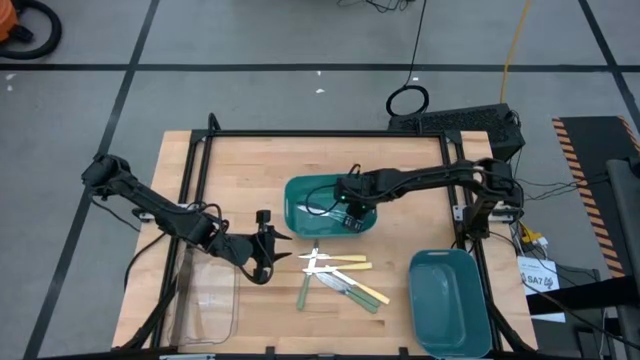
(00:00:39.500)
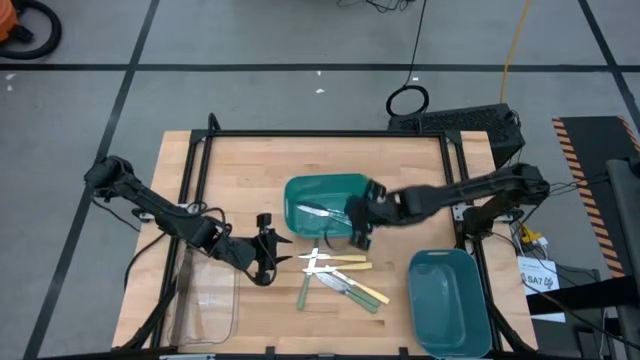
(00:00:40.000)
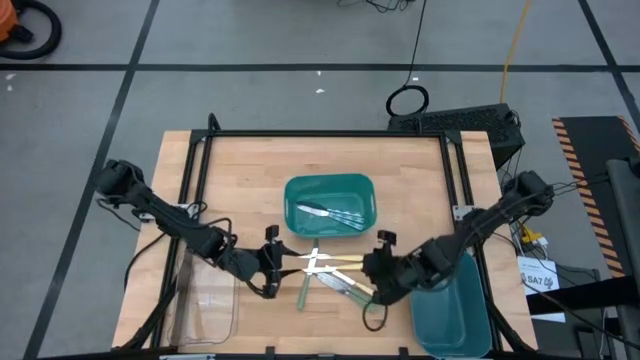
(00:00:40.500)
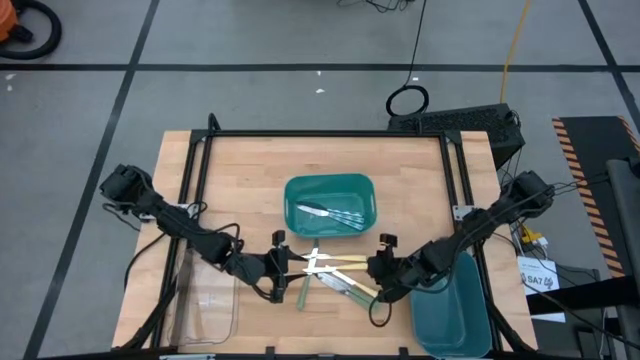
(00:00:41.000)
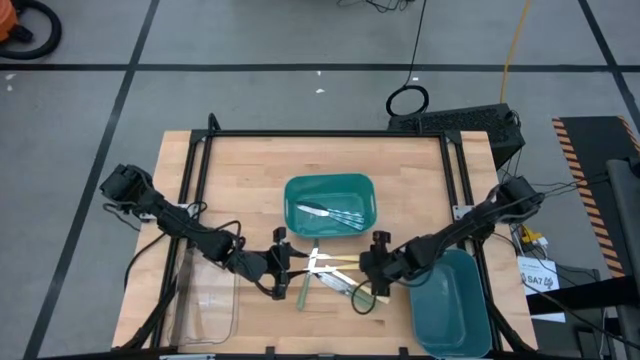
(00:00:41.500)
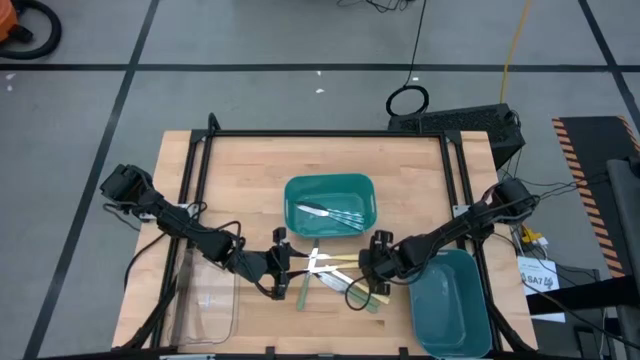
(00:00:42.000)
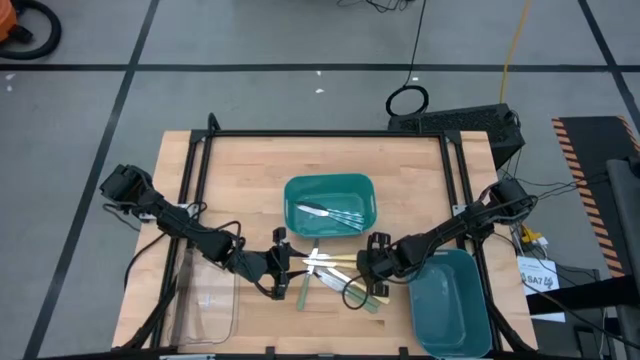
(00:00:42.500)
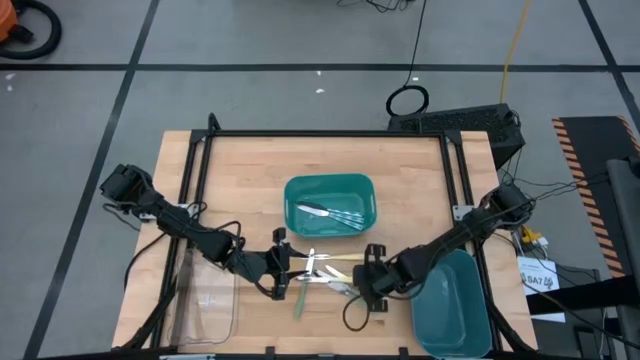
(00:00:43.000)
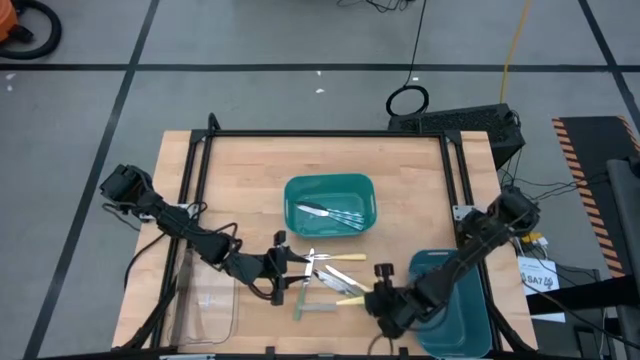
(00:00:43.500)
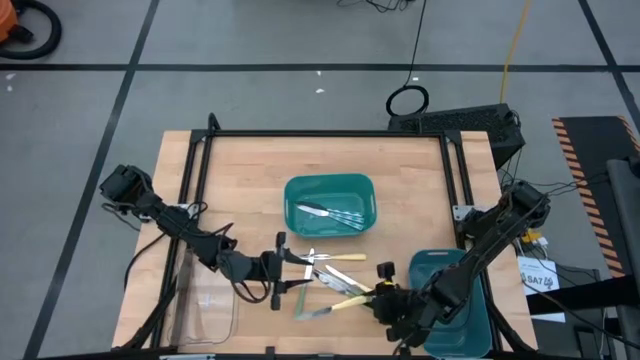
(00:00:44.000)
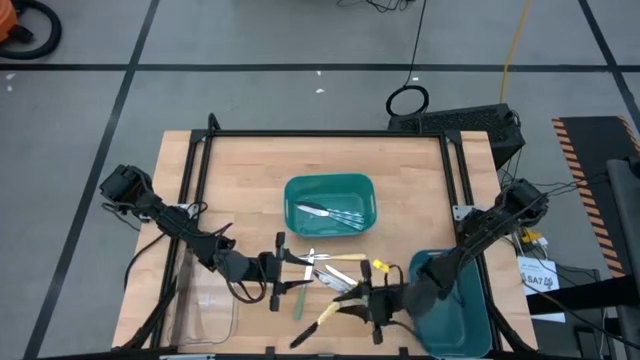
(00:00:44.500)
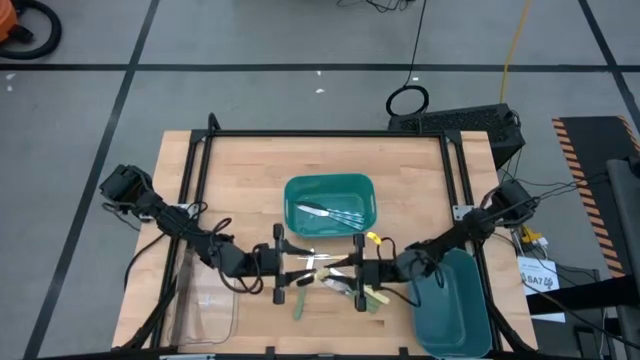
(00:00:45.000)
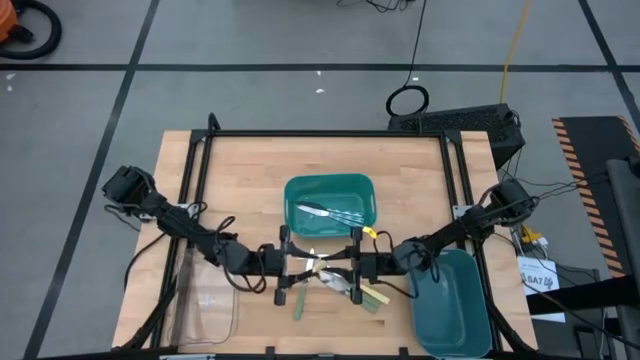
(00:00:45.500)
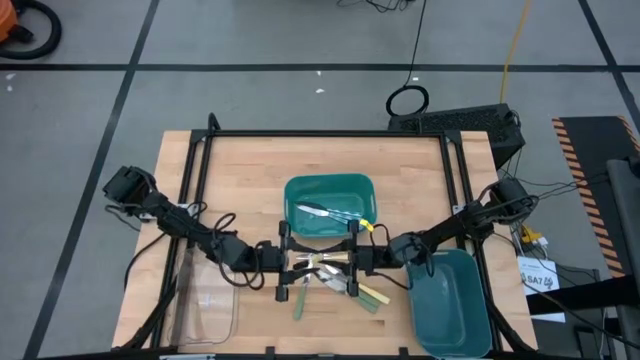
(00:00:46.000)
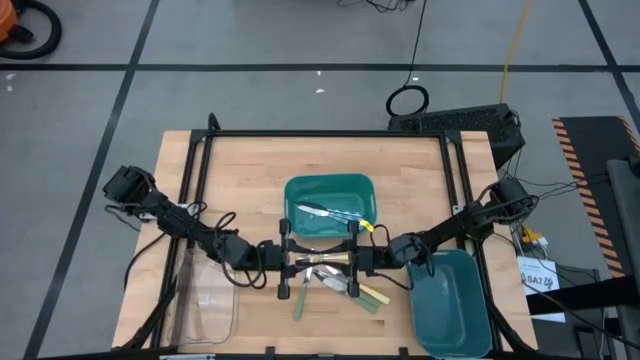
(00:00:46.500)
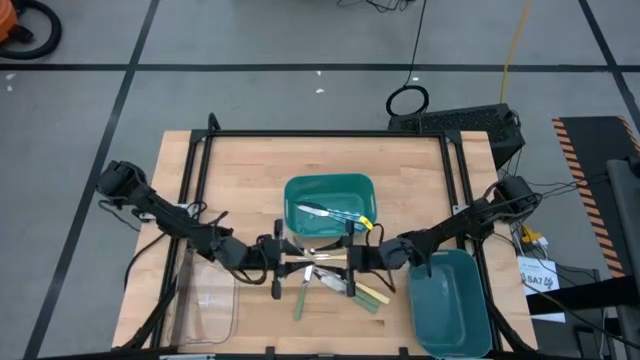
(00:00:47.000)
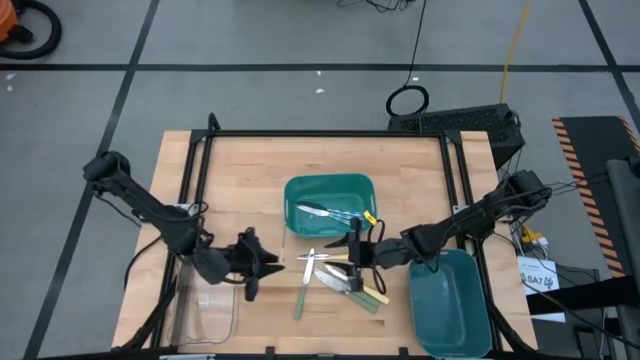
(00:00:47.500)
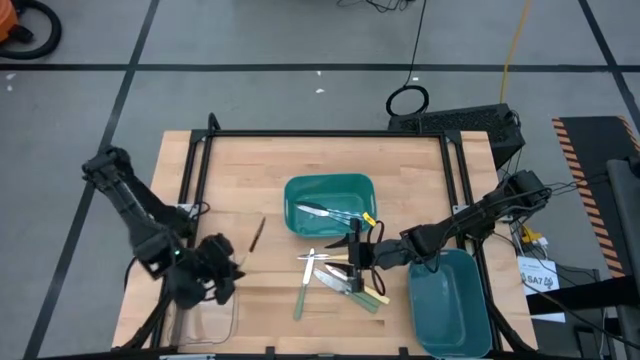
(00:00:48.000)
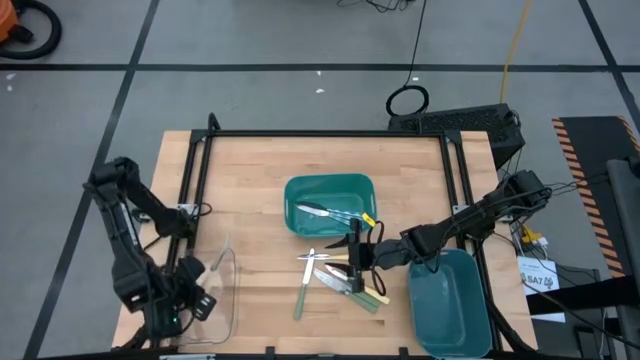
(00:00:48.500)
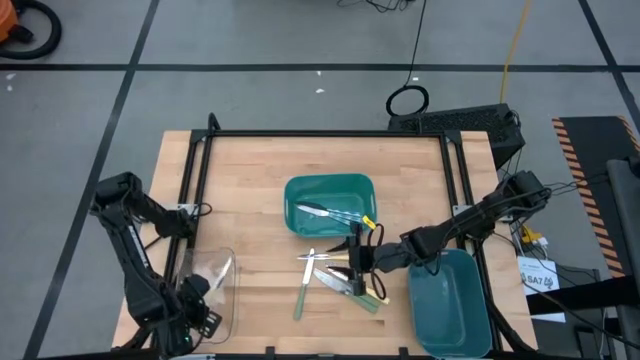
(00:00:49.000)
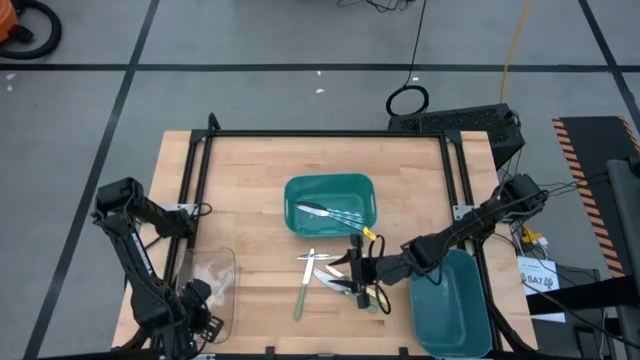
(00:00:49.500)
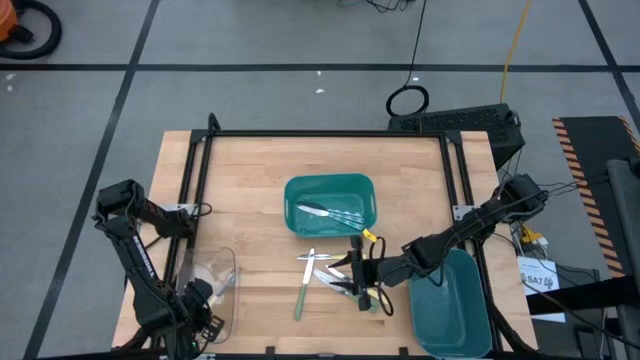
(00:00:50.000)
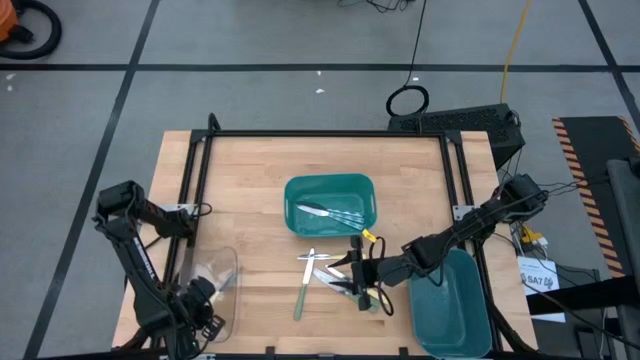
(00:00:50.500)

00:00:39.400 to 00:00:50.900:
Task: Sort silverware by color (type)
Put the middle yellow knife into the transparent bin

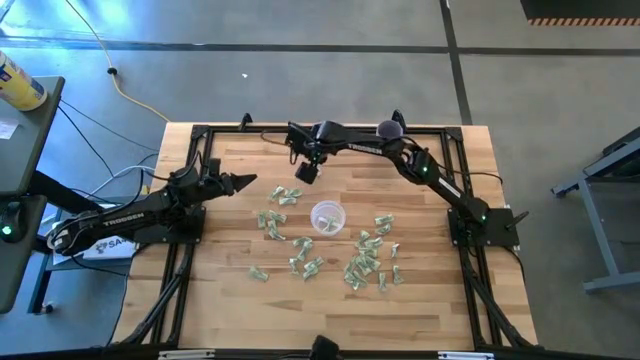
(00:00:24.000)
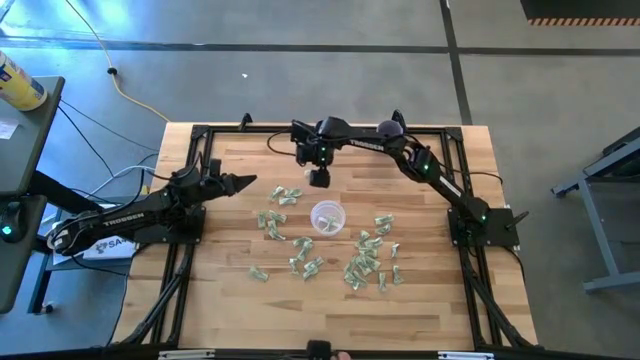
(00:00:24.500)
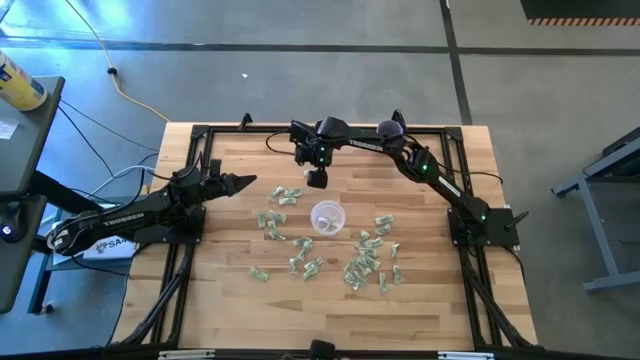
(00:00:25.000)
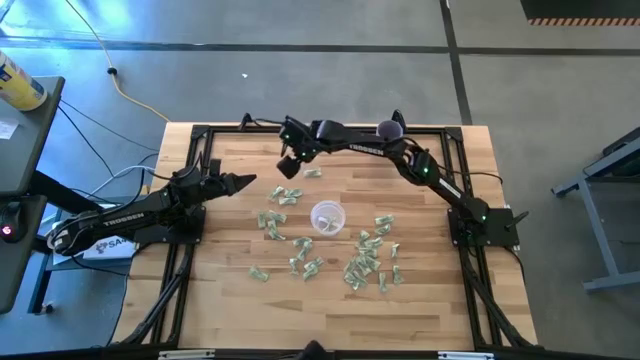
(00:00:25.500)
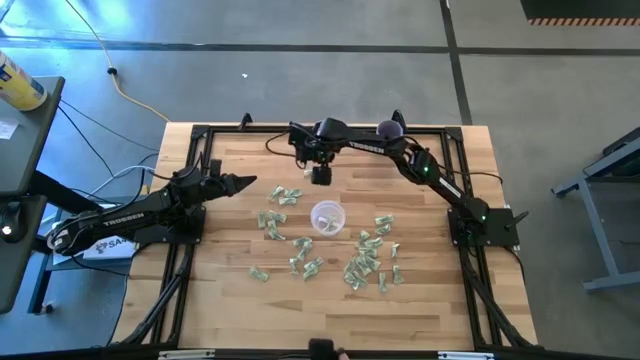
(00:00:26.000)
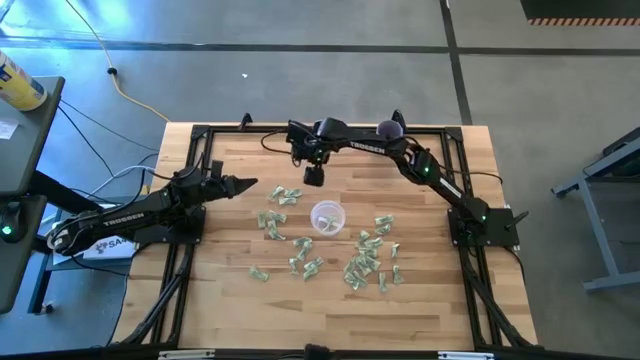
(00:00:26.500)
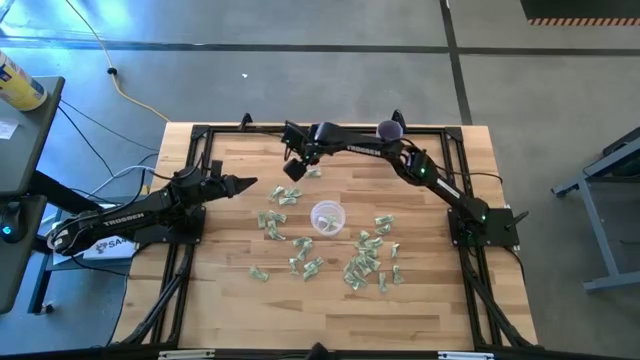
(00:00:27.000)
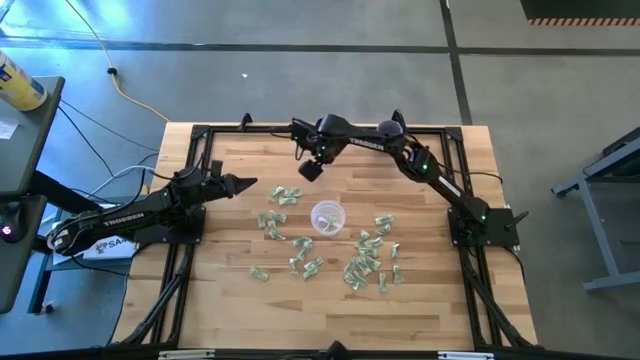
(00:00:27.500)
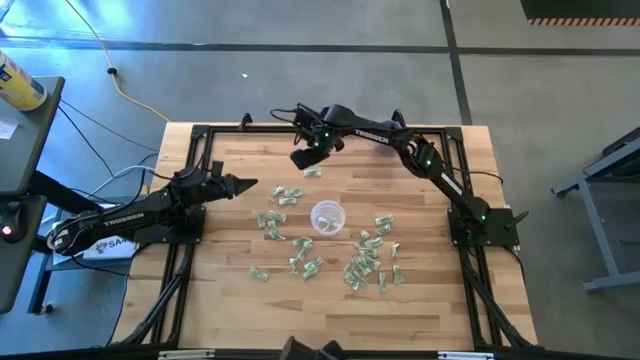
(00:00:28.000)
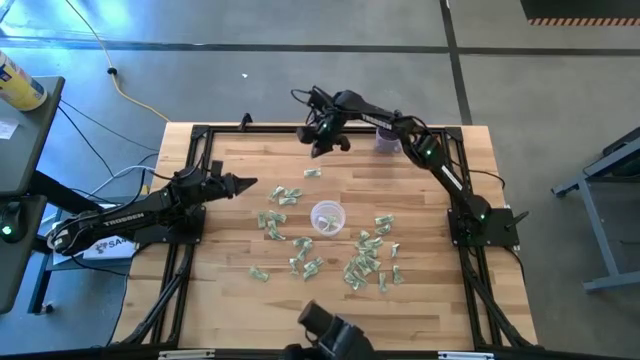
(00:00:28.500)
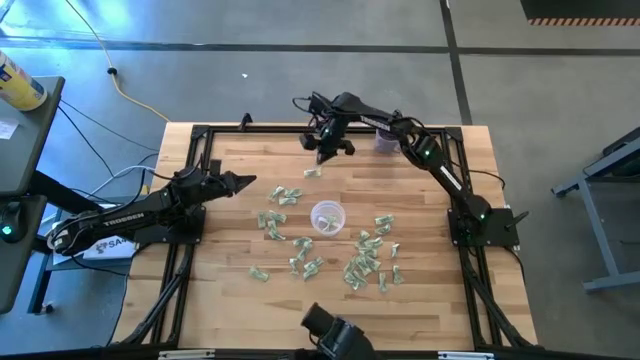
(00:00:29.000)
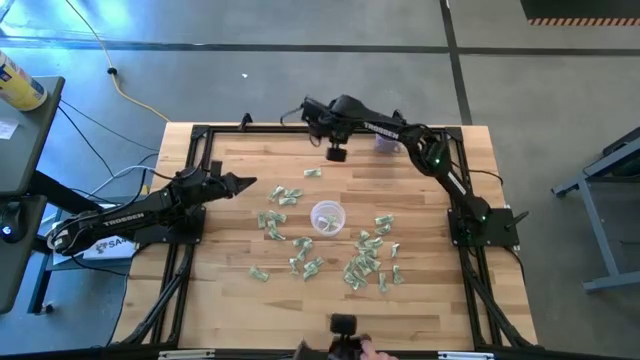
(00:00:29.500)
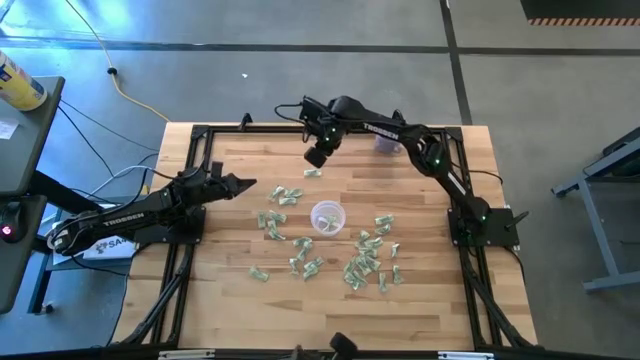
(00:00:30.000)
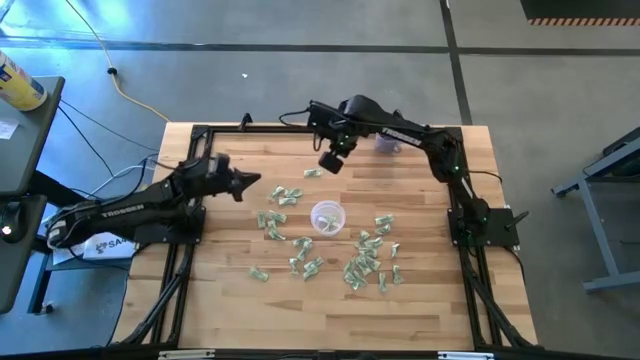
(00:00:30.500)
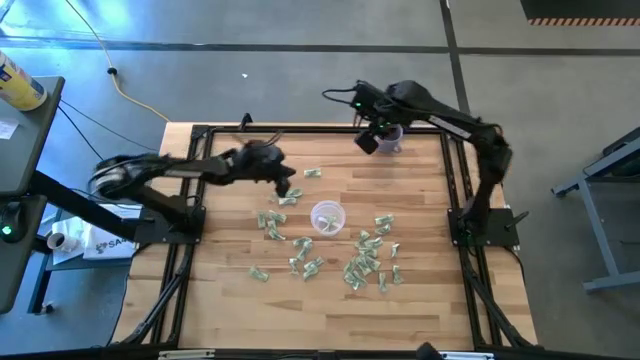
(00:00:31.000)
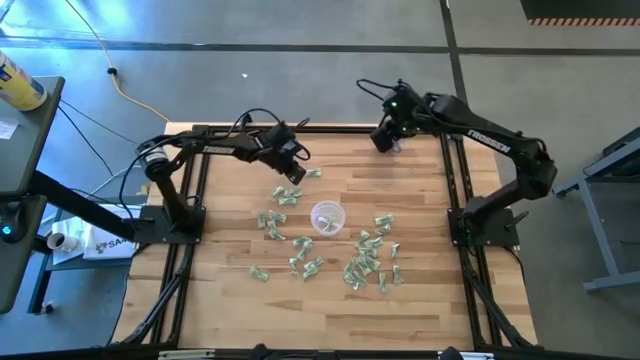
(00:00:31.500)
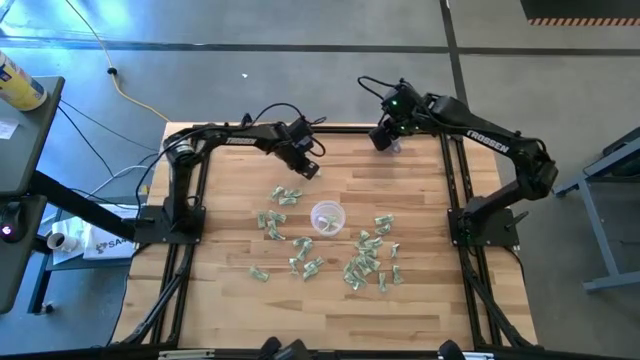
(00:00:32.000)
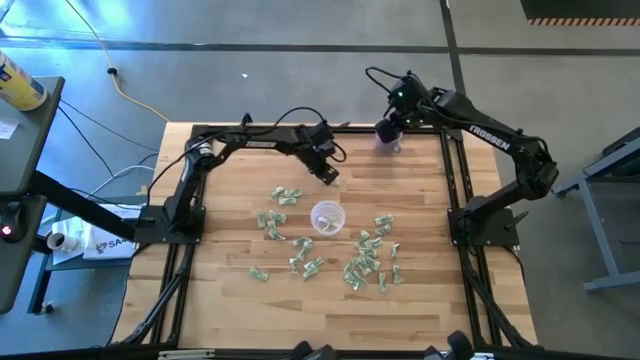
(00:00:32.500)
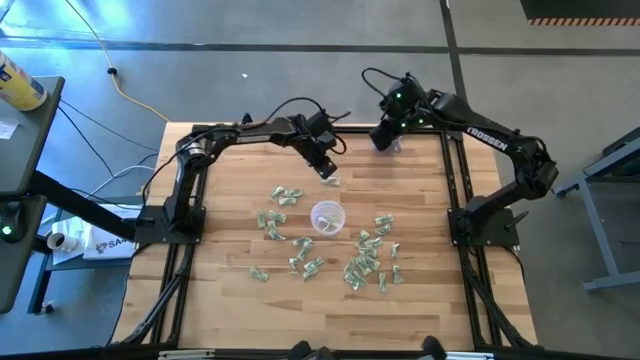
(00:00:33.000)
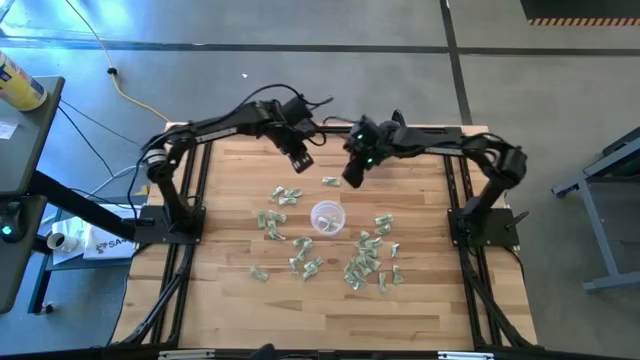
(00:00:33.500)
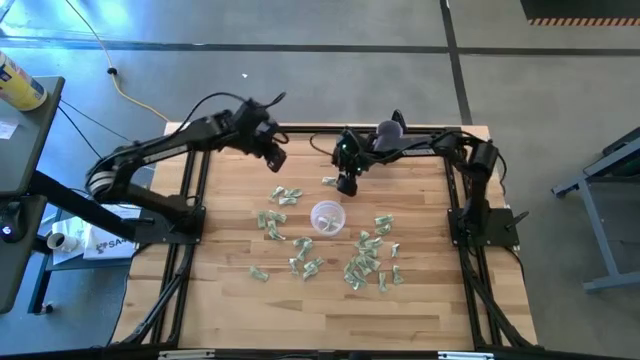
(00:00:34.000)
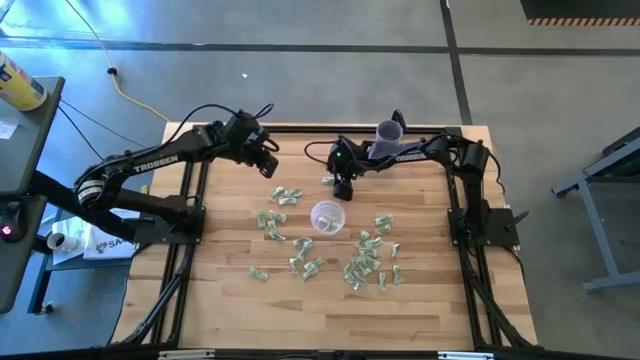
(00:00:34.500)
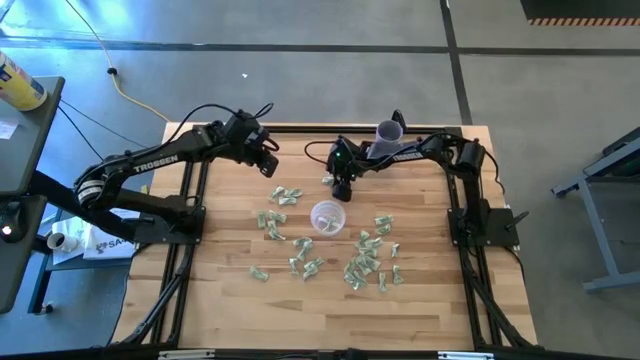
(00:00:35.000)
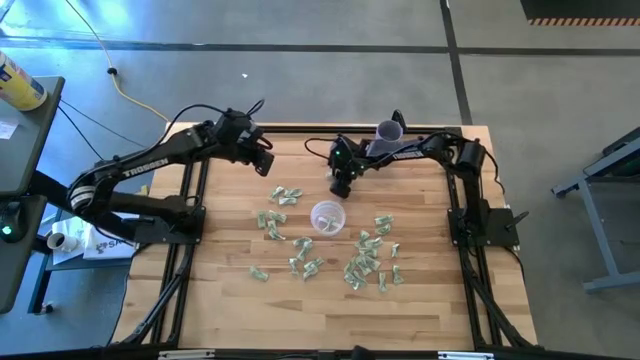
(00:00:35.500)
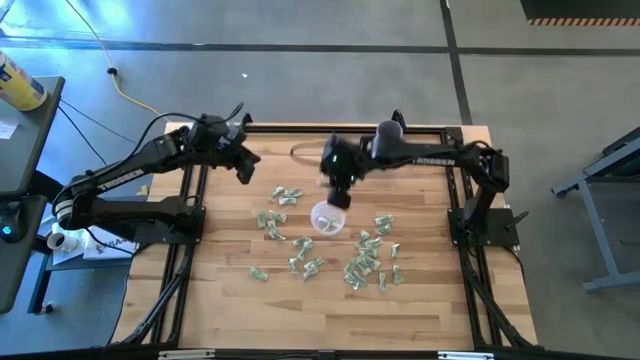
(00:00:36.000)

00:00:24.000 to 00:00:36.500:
Task: Pick and place Stevia / Truvia into bins
Put the green stevia packet into the transparent bin
